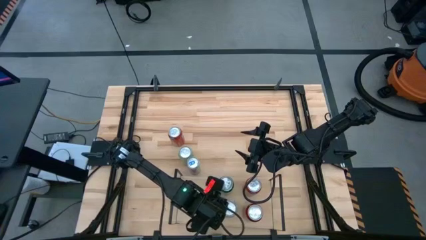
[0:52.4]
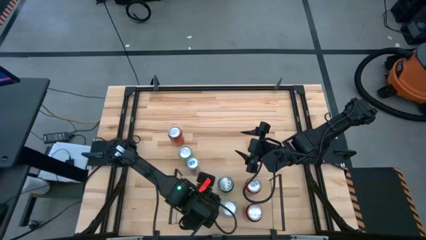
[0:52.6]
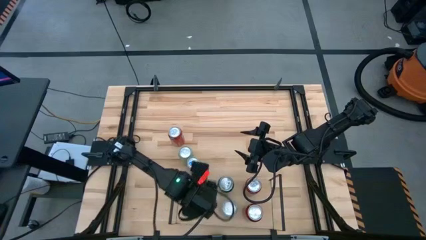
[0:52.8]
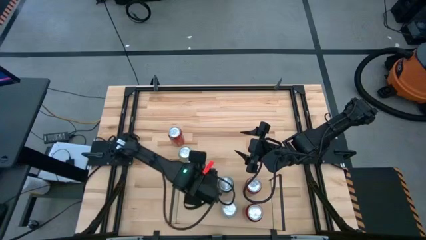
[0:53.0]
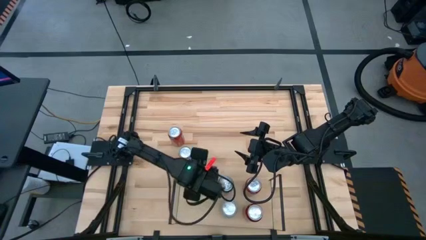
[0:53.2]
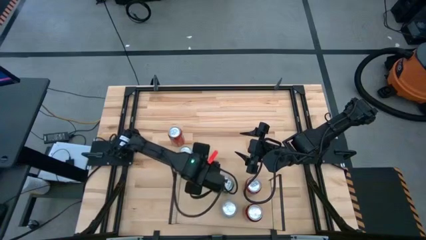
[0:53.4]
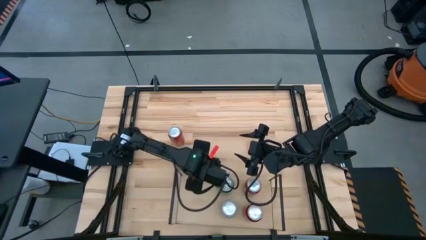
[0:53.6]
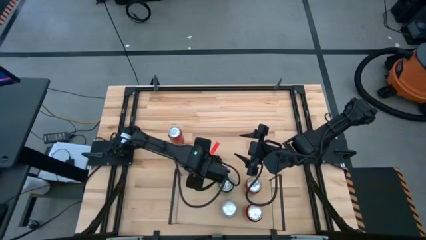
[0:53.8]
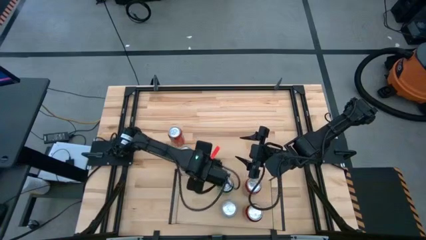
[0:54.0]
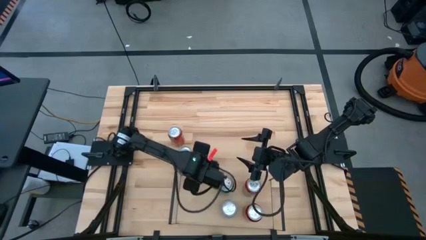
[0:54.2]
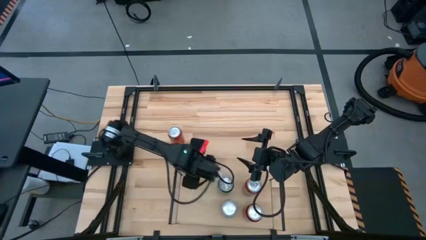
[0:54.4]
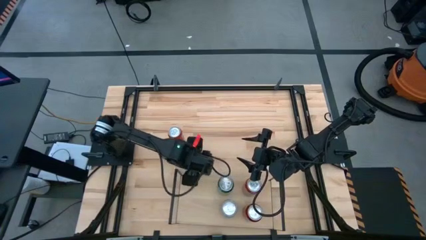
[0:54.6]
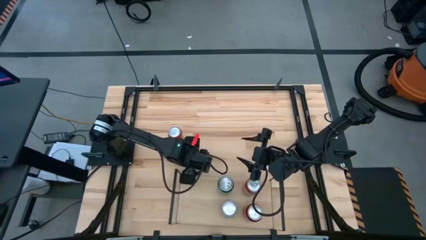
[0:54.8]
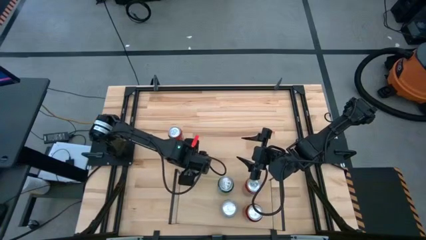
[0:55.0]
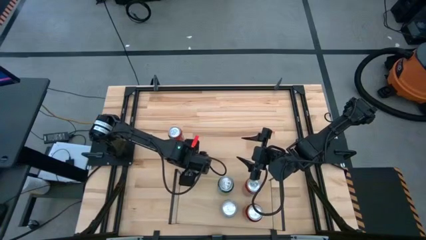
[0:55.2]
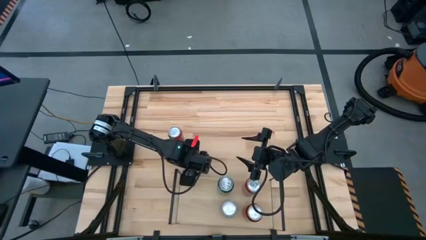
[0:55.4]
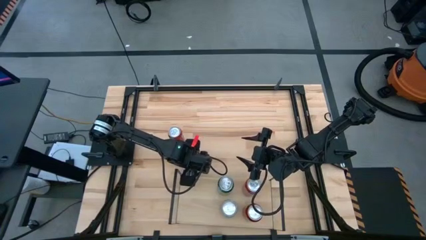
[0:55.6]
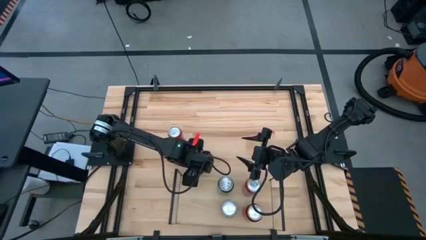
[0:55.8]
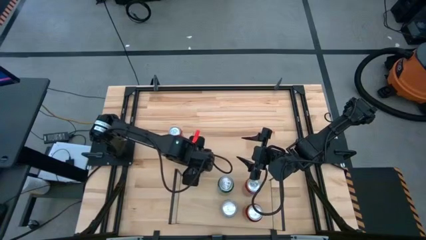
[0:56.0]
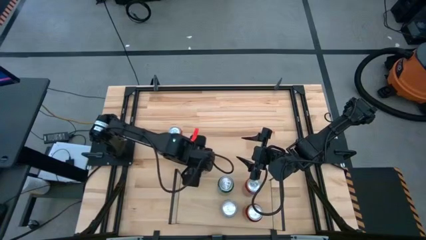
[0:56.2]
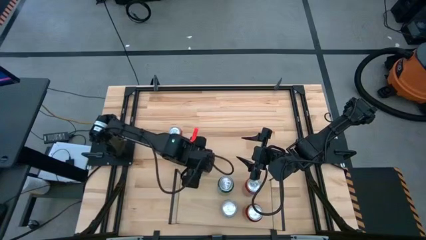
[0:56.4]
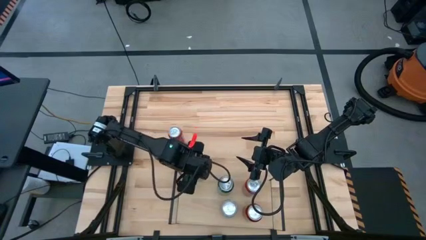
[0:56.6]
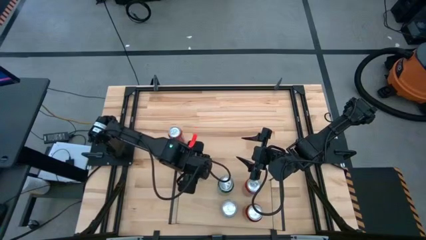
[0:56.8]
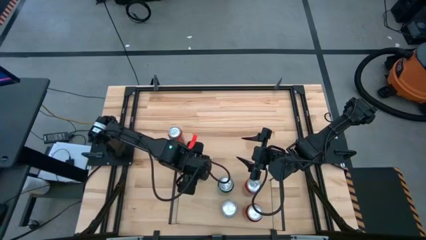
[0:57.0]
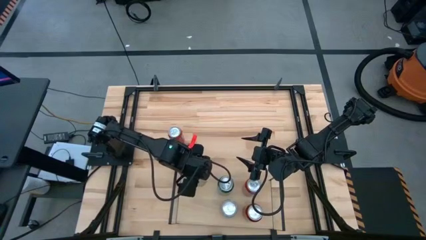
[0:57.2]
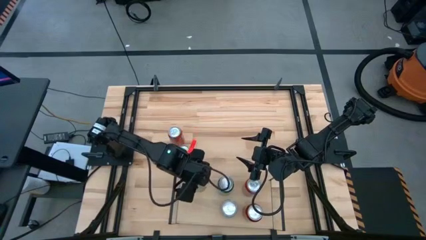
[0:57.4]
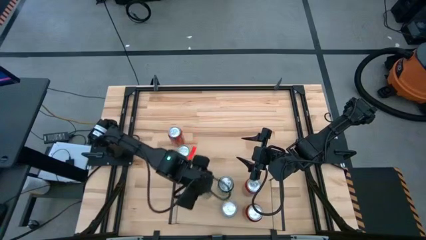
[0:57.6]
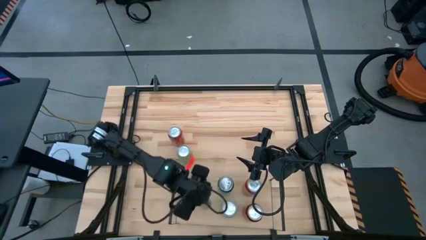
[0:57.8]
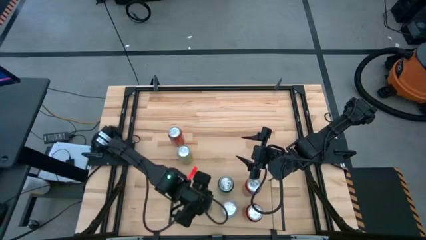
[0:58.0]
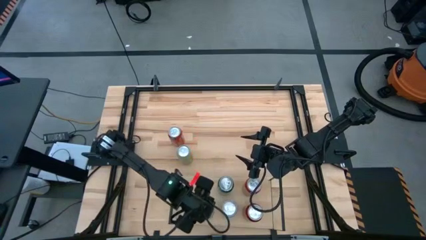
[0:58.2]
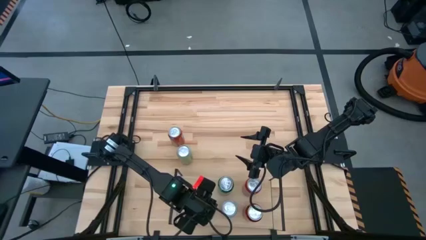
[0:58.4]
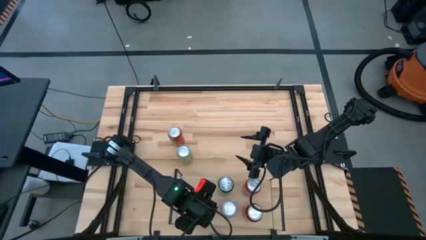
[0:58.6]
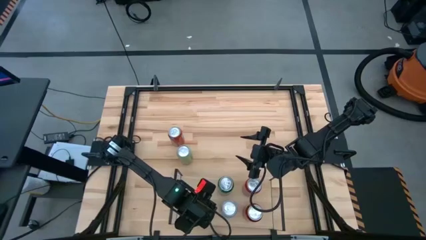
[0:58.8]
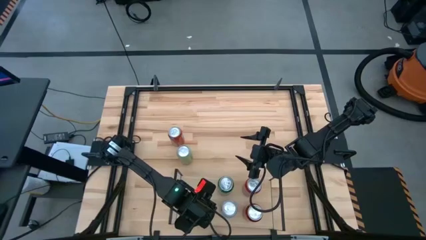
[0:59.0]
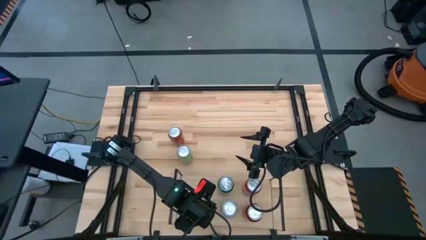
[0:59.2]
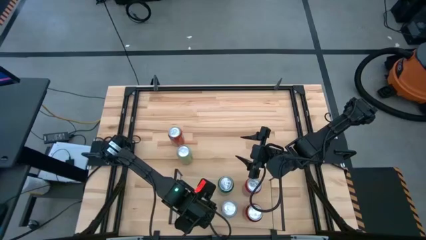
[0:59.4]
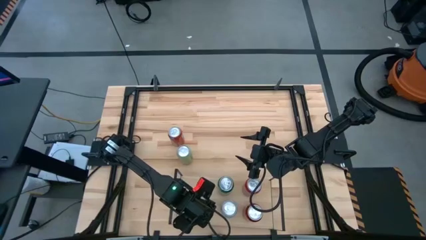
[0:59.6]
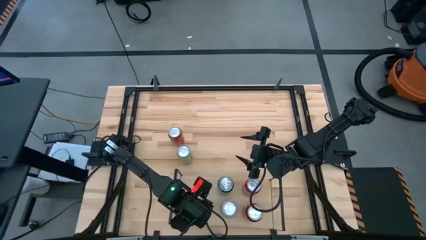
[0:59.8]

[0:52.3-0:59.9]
Task: Place canned beverage on shelf
Put the blue soda can can on the shelf

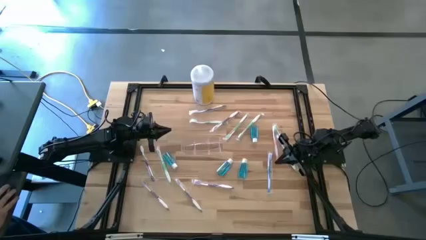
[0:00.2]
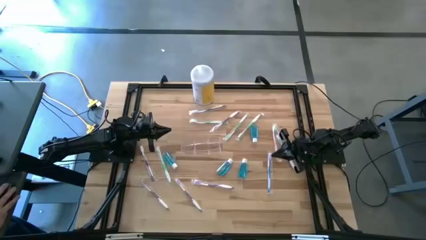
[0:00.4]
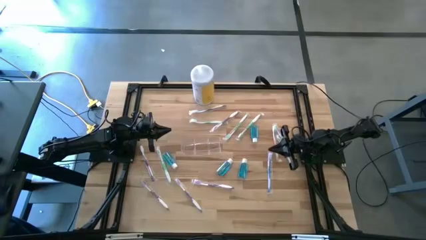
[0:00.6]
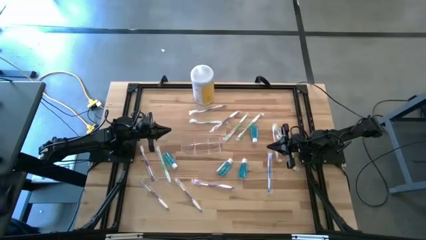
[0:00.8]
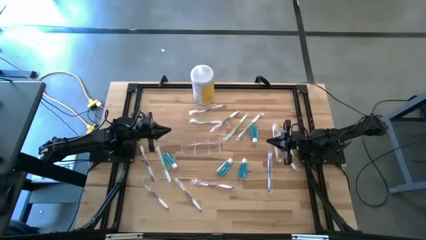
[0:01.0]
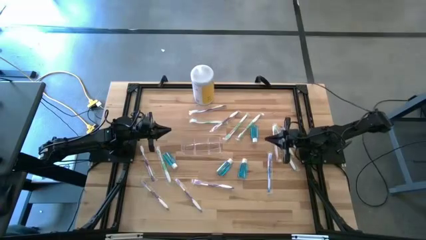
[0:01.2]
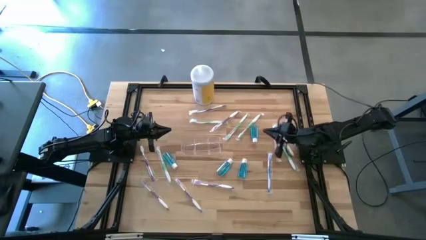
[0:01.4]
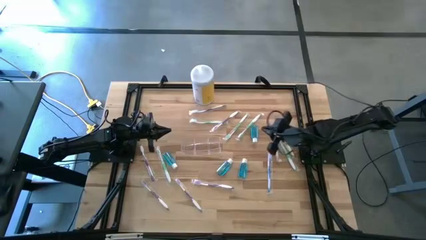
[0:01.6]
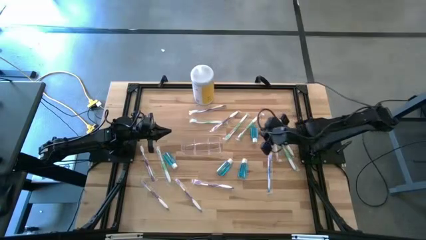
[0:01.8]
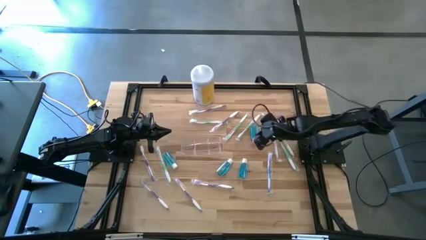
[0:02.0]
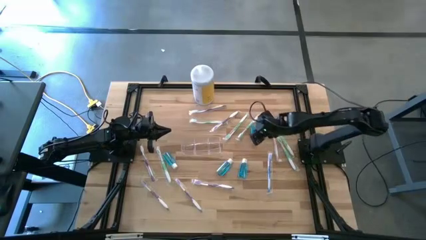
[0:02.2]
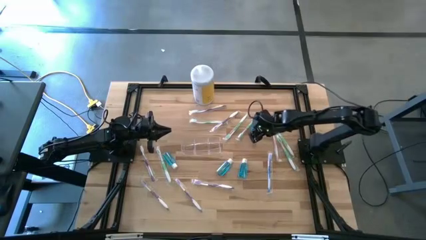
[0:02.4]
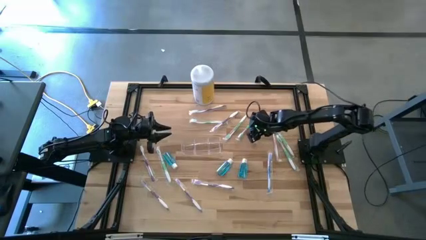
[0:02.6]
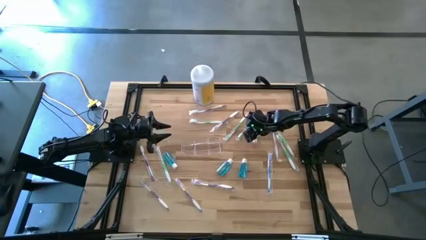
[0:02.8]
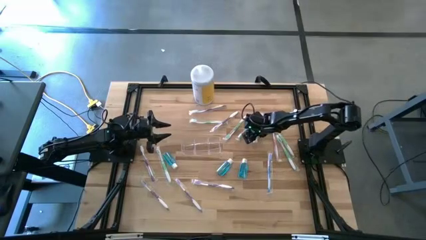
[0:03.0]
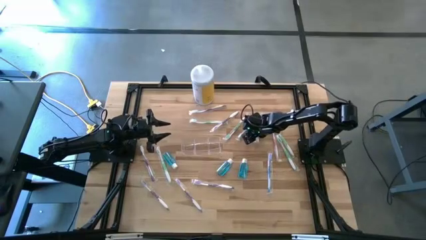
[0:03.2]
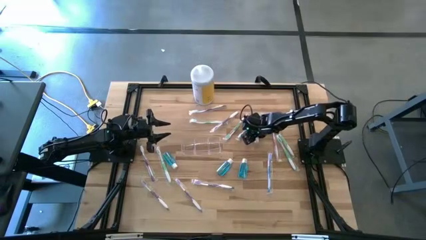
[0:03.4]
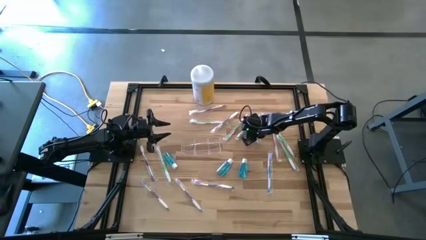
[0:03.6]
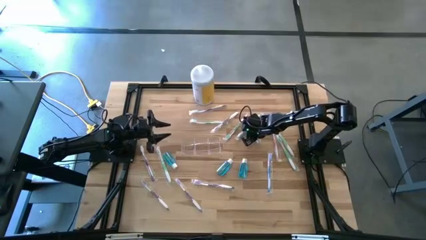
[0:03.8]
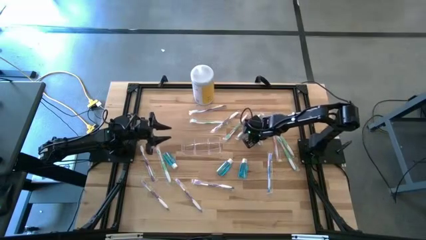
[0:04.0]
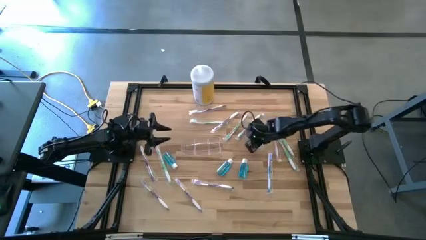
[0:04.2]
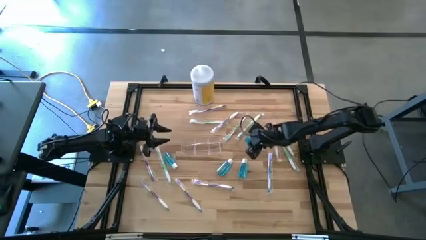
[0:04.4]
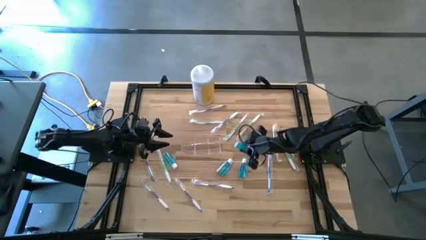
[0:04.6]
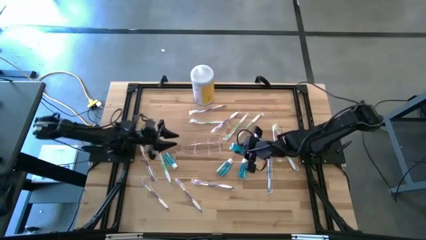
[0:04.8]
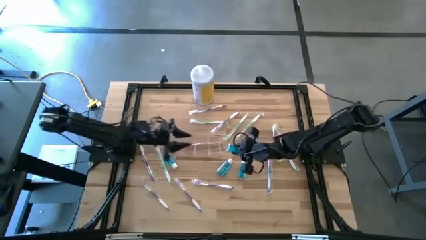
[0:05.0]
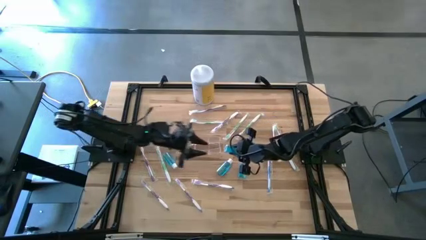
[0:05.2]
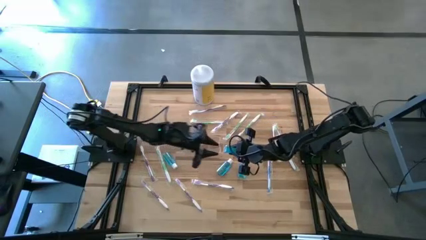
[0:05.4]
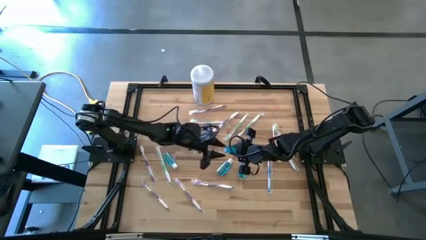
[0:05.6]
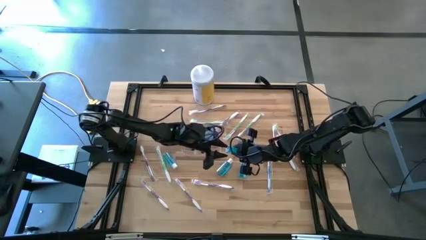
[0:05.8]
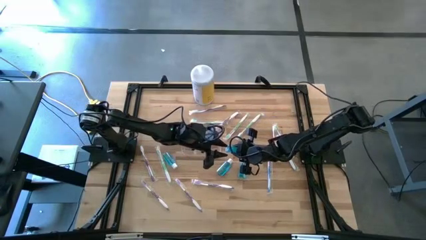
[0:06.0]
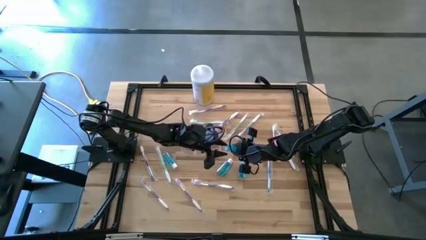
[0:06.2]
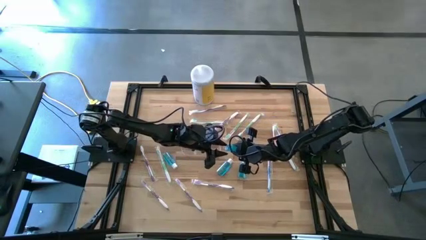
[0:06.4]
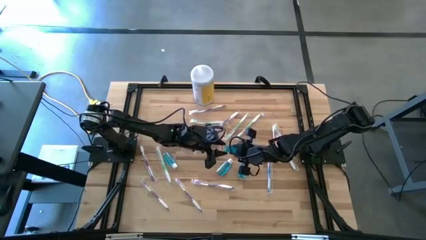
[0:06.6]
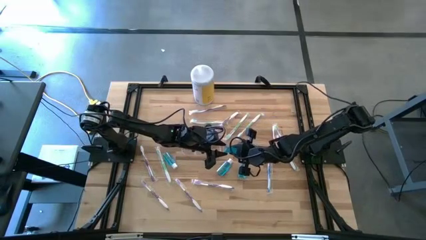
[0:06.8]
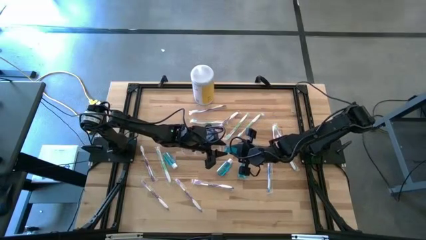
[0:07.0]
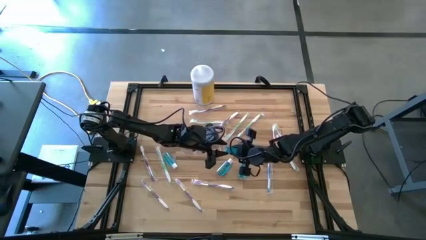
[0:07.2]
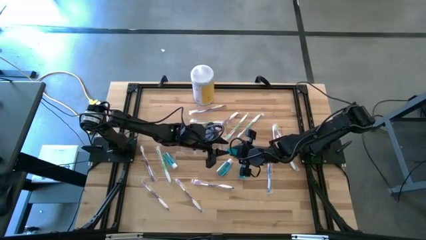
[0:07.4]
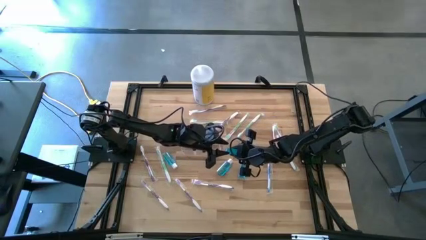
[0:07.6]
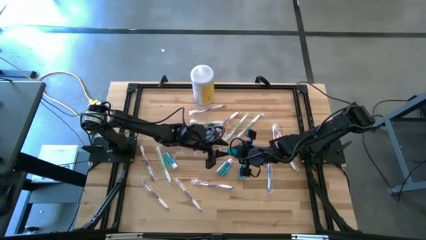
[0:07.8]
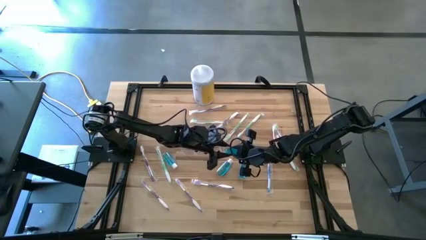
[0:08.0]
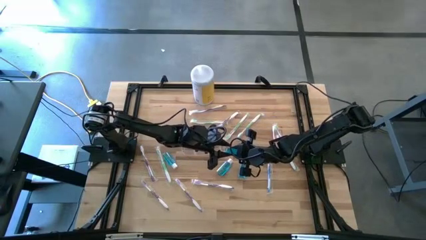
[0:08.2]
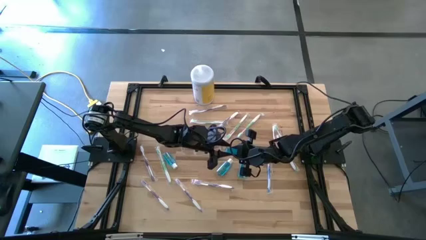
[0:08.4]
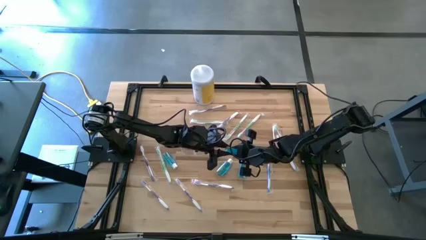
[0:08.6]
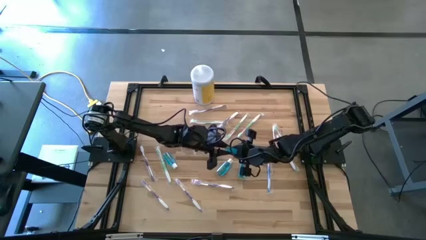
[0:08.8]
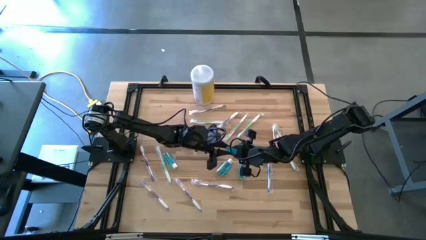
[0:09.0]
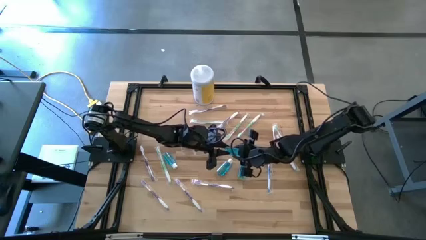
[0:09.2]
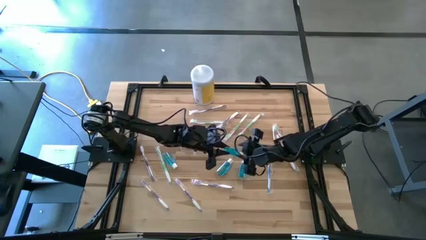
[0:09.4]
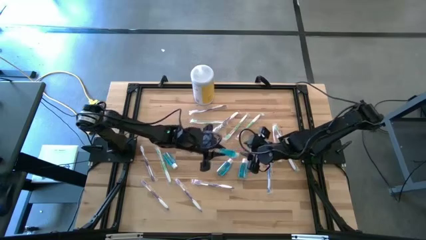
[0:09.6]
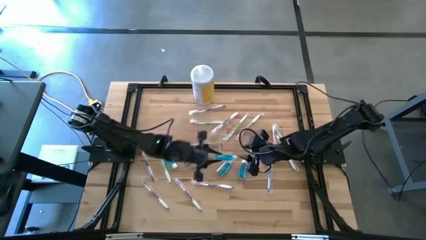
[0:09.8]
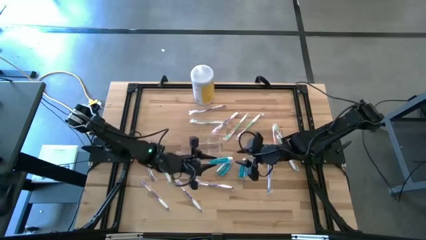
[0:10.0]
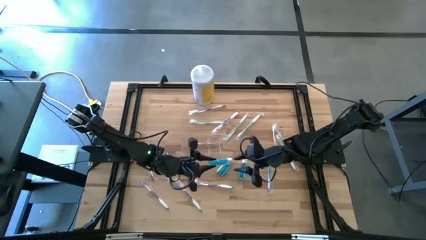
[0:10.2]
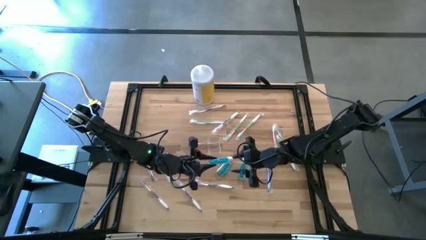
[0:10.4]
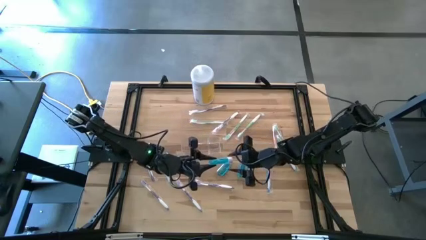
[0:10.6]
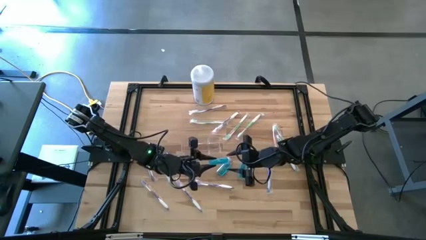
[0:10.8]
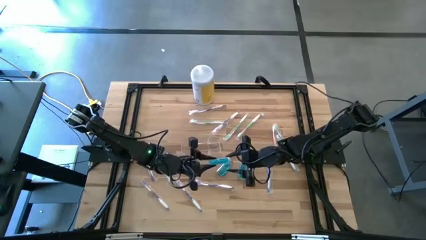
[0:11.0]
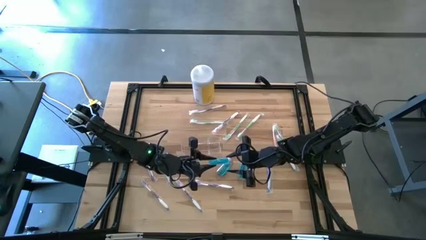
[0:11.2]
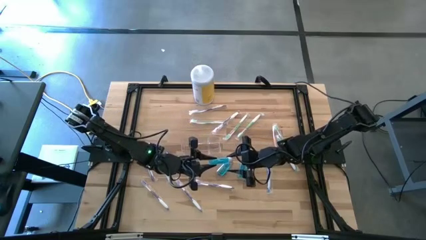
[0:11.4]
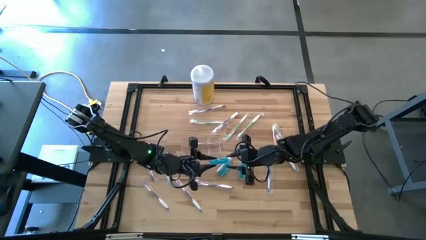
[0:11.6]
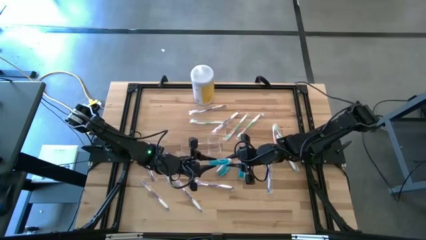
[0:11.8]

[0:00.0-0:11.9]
Task: Pick & Place toothbrushing station
Put the mouthwash bottle into the transparent organizer
